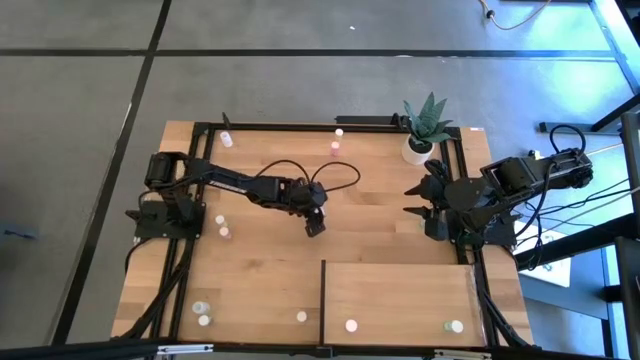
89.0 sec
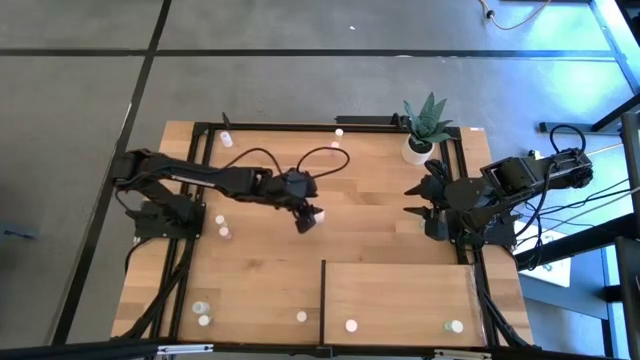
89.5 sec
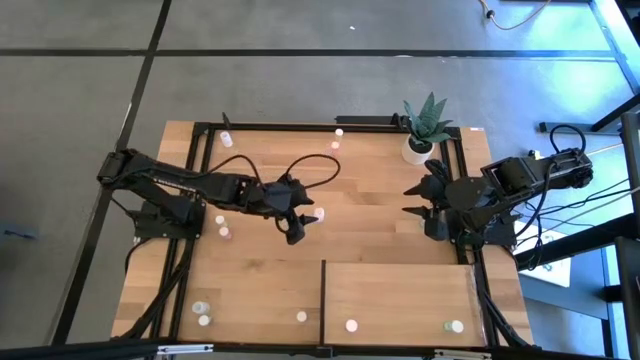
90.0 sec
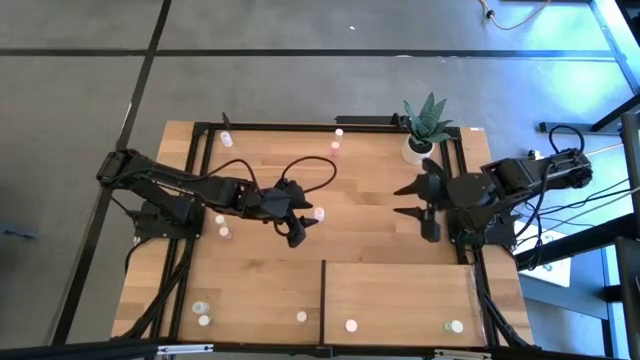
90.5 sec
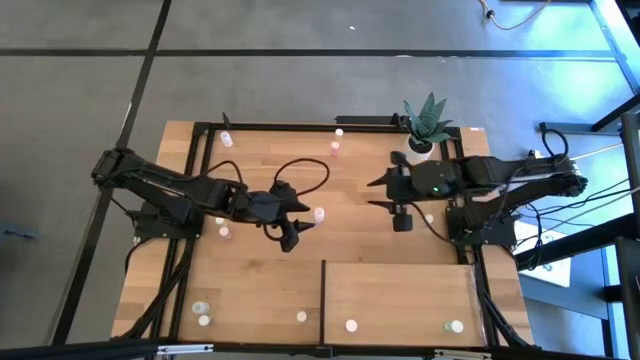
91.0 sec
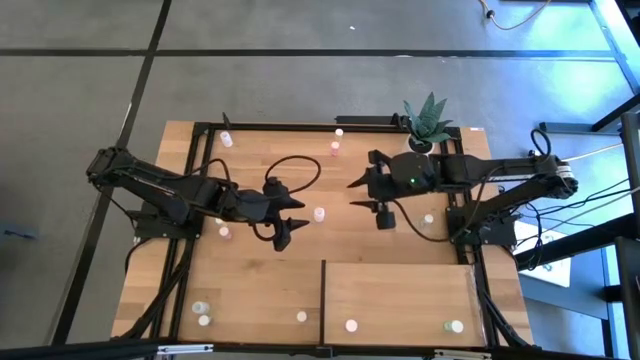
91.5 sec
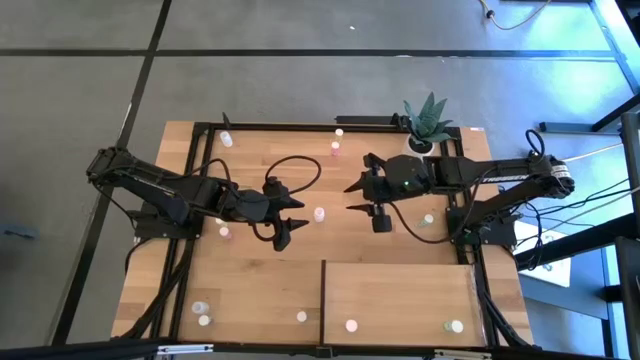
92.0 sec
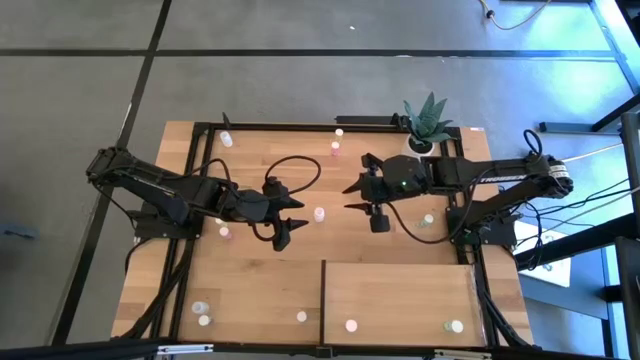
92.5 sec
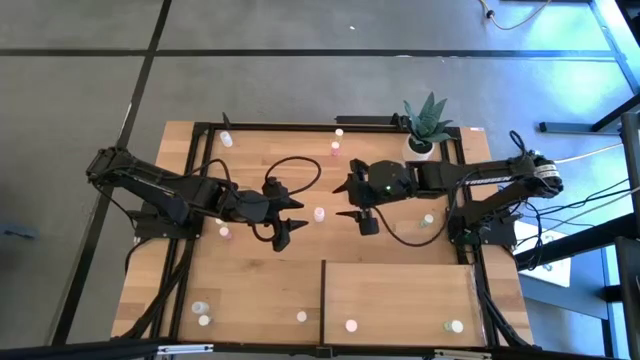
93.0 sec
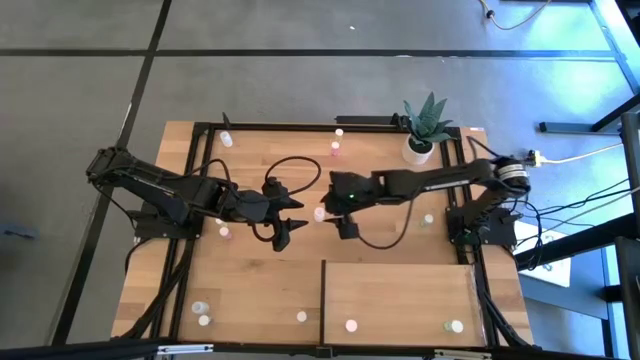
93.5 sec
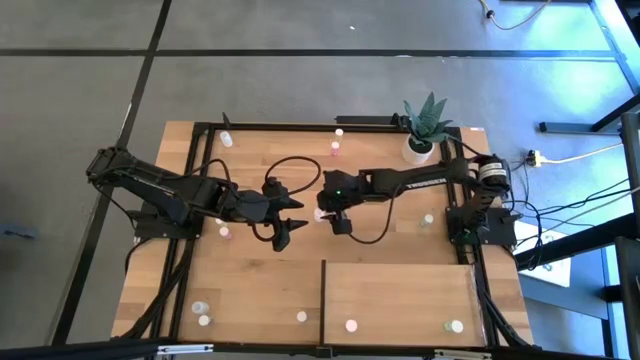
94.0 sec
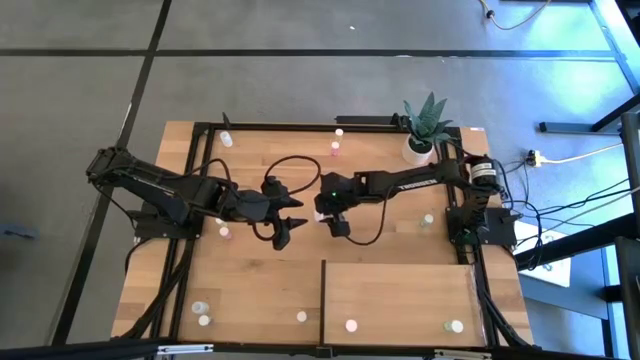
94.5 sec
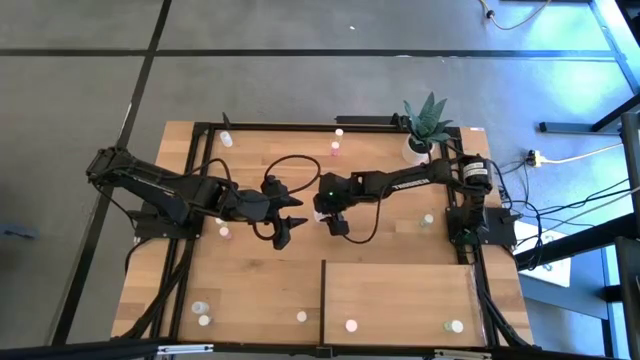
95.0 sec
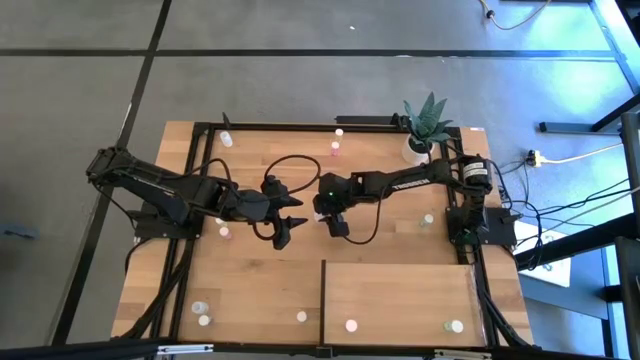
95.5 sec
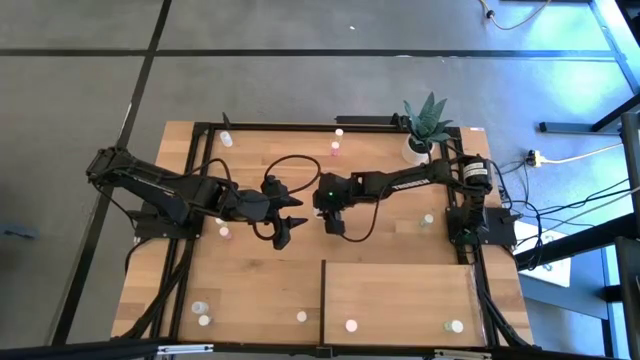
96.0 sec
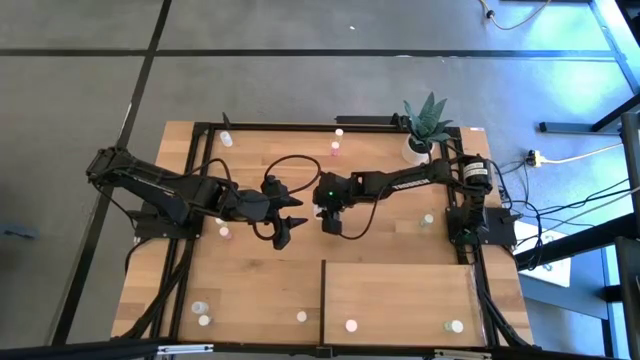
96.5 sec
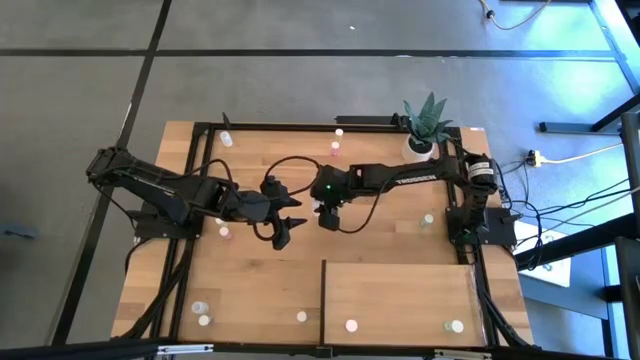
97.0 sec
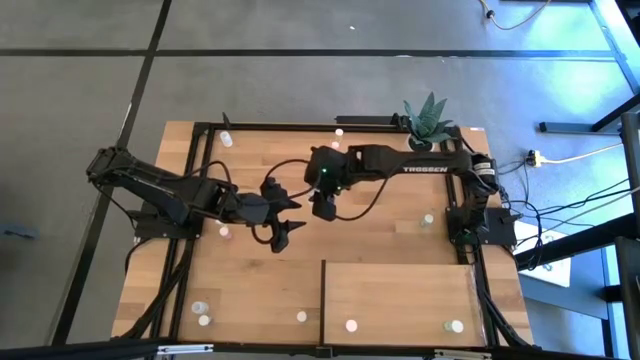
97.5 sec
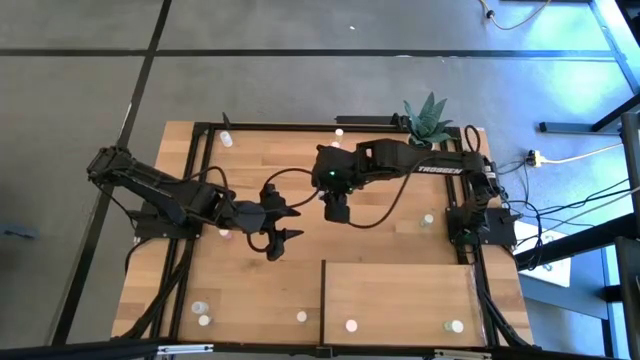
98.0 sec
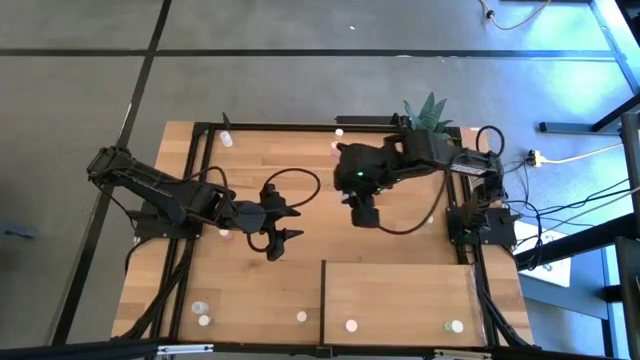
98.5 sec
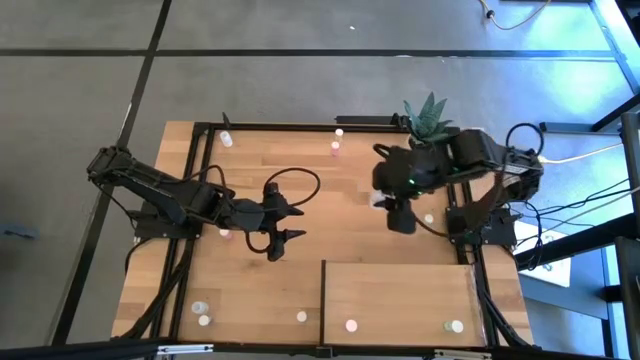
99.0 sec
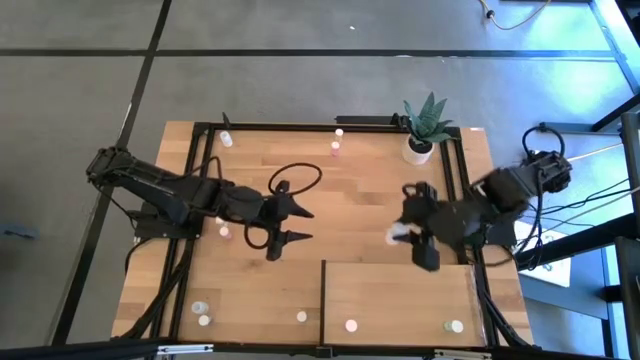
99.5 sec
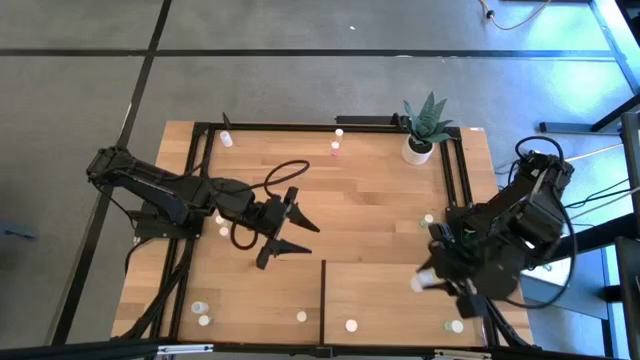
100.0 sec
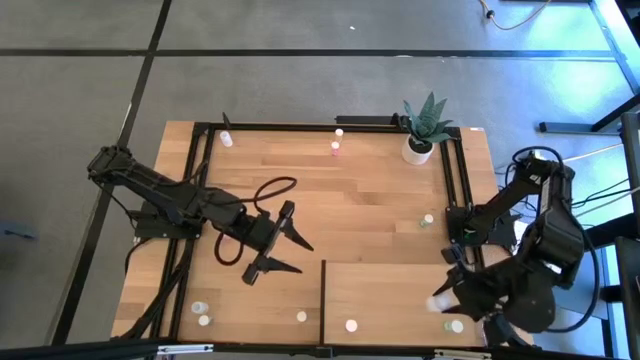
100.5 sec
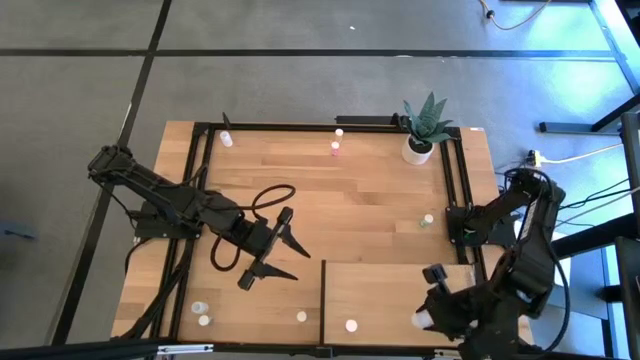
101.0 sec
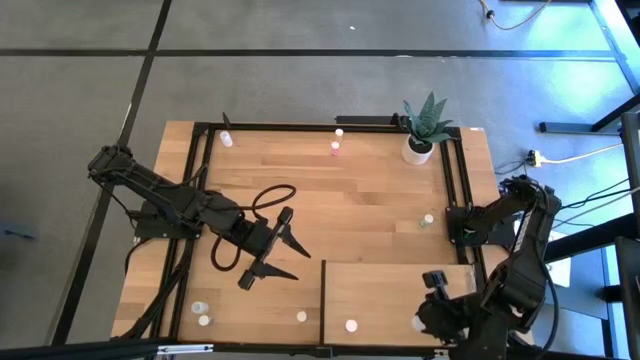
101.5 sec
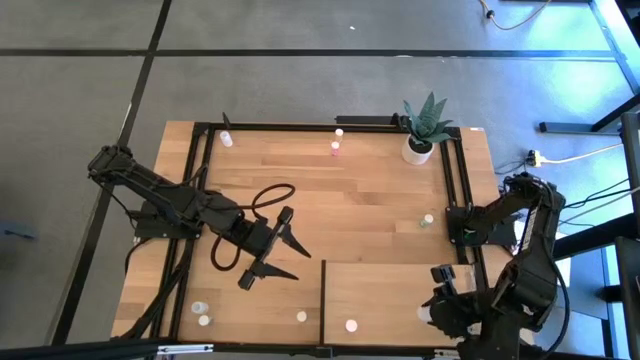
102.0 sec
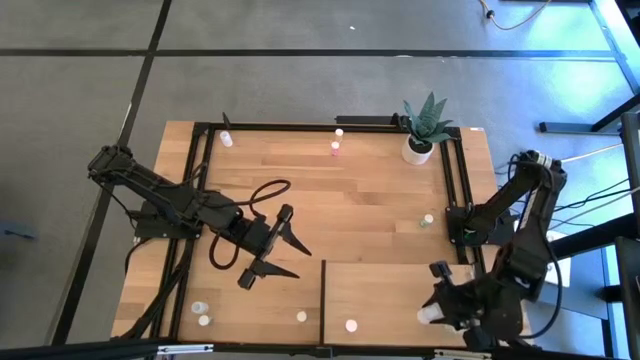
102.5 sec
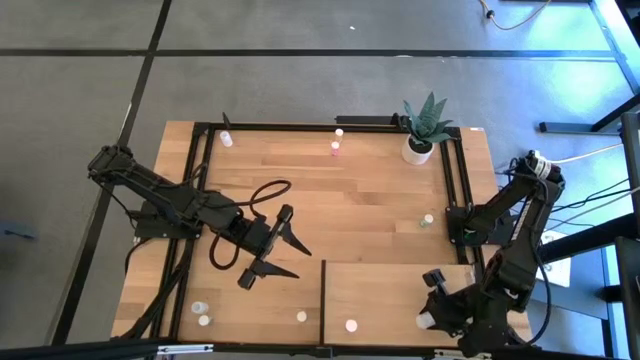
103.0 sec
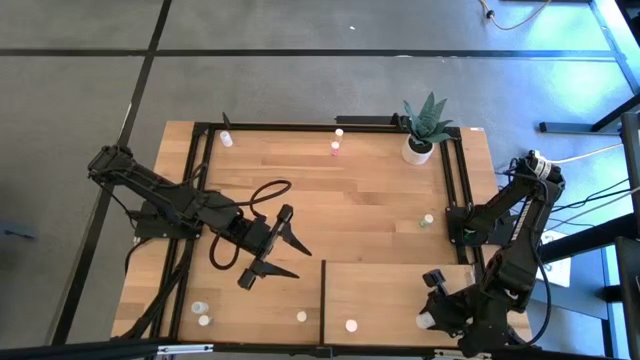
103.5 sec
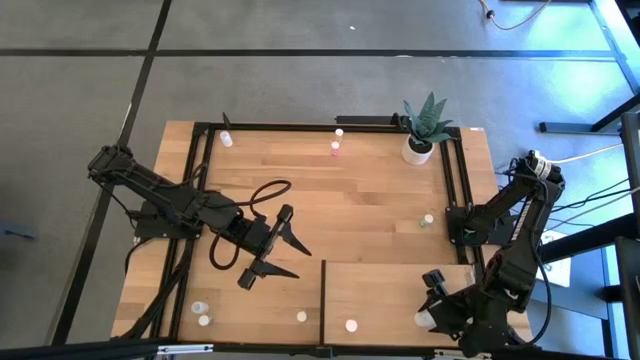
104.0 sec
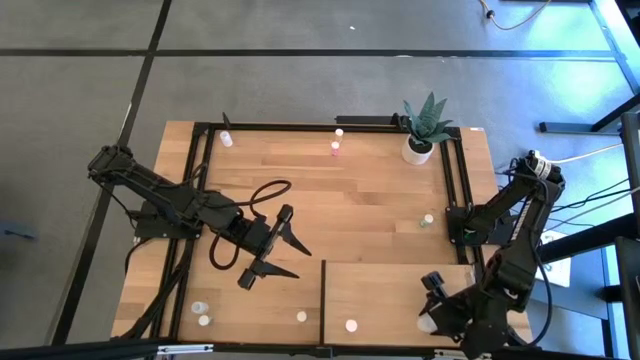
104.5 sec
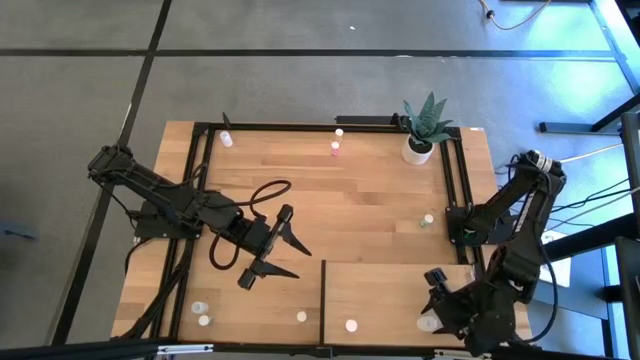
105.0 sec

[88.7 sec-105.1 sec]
Task: Pick and place medicine bottles onto shelf by color
Put the bottom right transparent pill bottle on the shelf

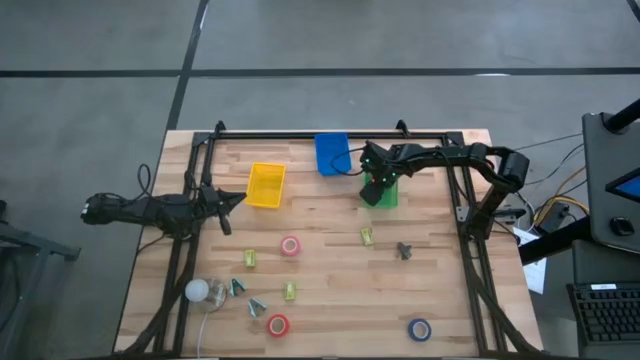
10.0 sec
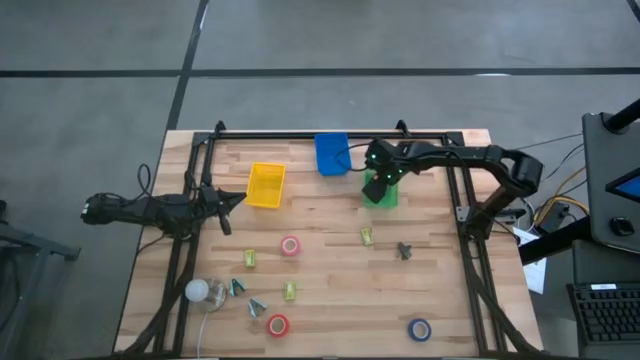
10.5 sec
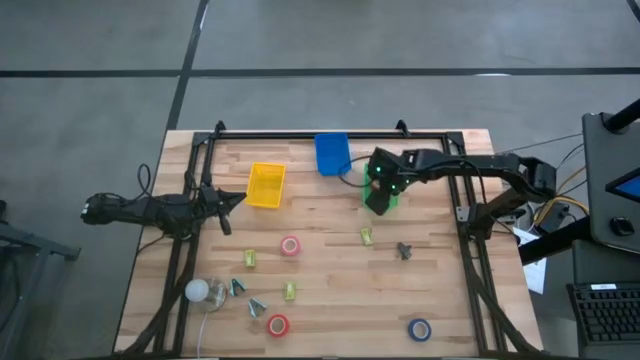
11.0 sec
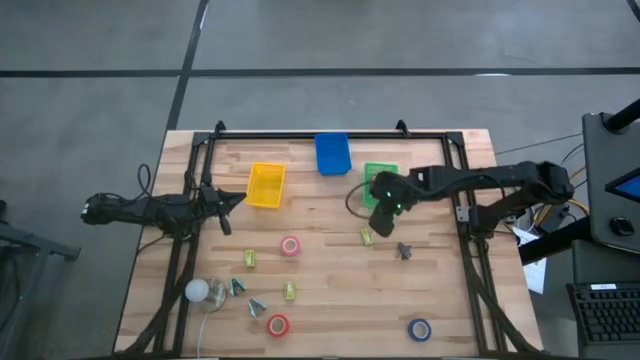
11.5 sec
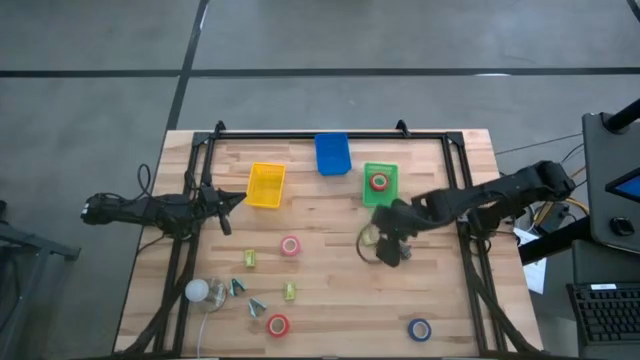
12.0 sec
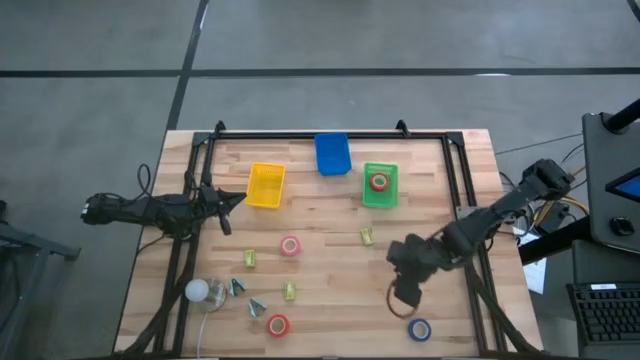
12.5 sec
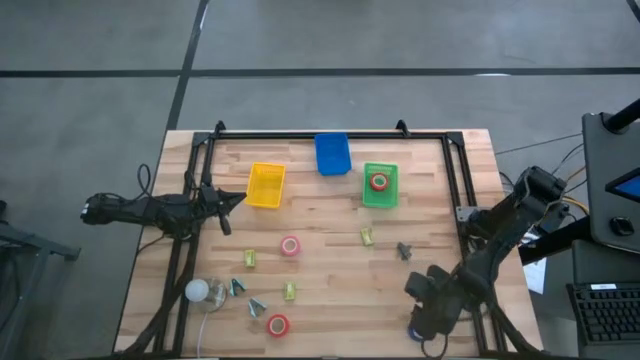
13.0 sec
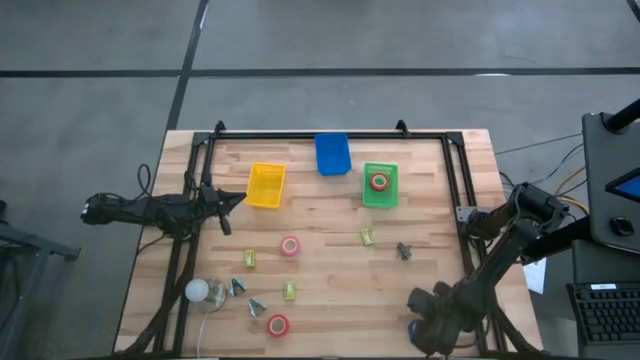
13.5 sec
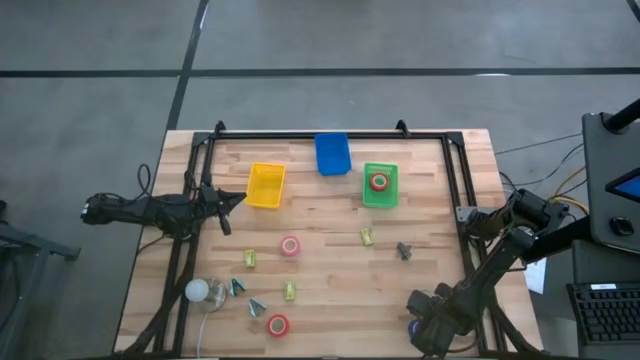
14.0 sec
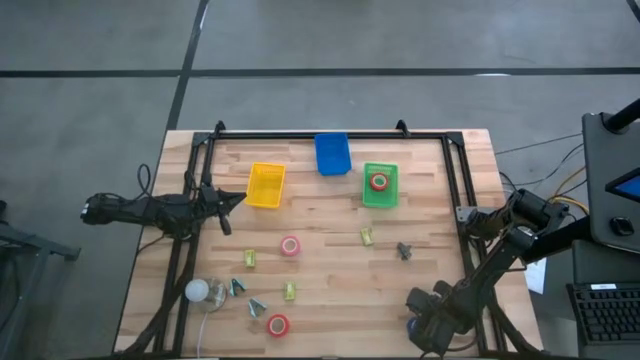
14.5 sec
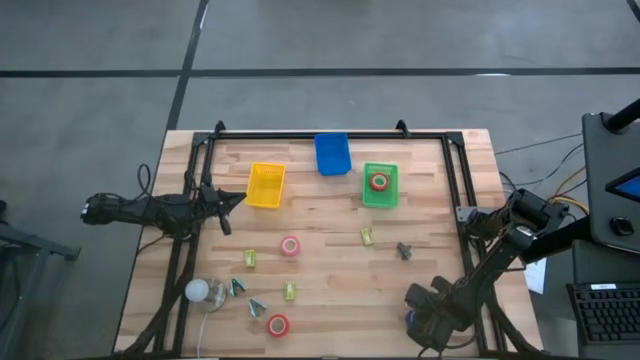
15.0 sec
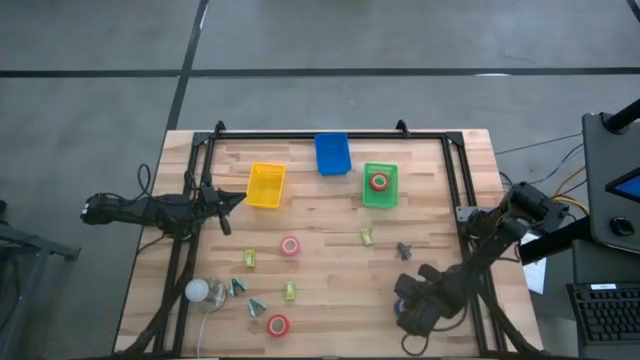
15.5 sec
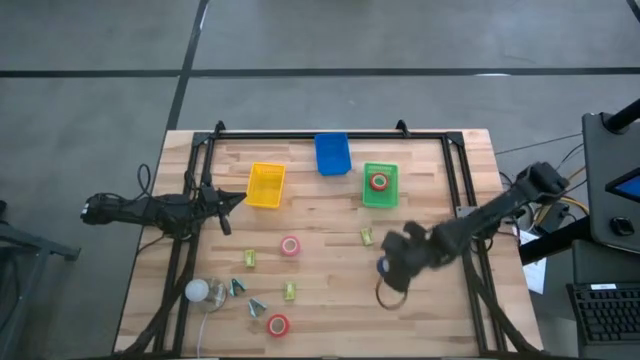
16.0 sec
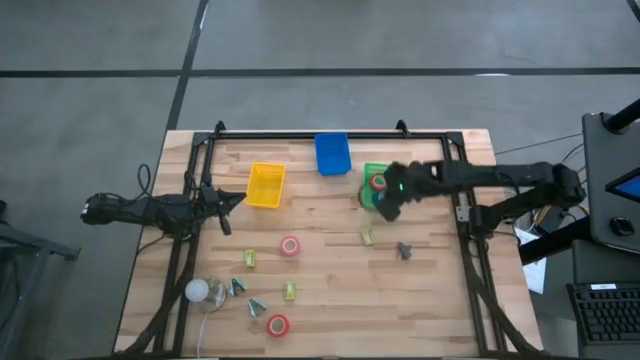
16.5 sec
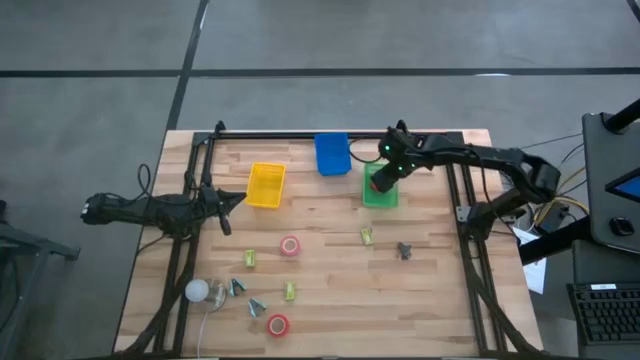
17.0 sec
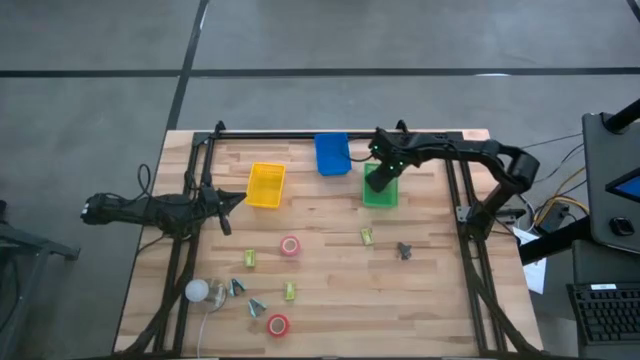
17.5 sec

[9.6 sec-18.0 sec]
Task: Pick and place Stapler, Stapler remover, tape
Put the blue tape into the green basket
